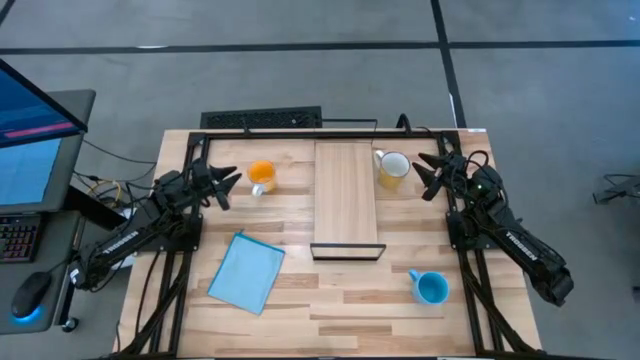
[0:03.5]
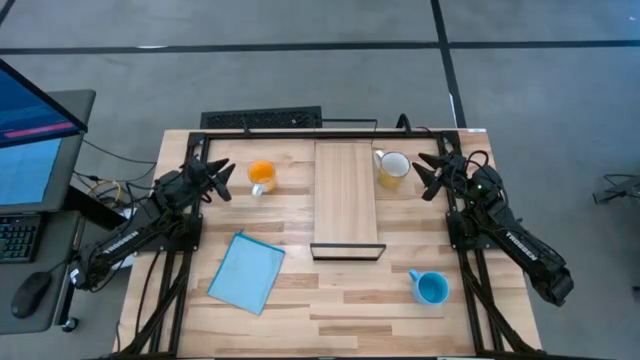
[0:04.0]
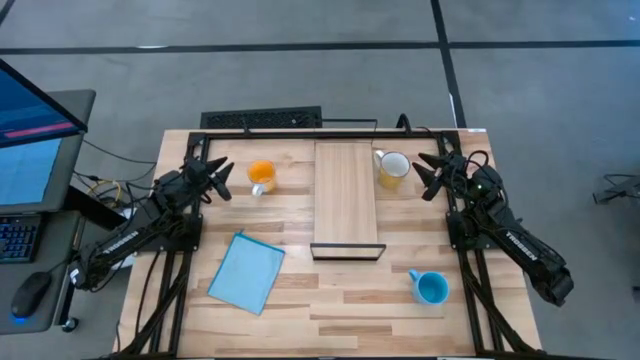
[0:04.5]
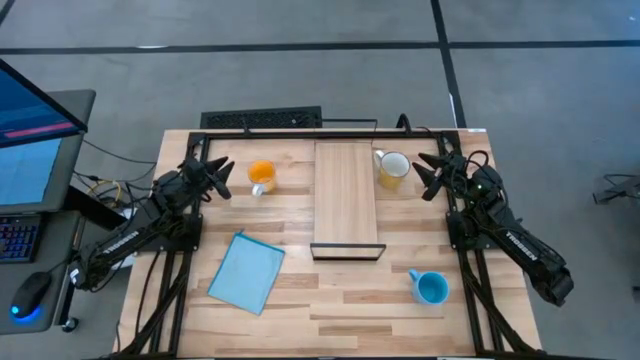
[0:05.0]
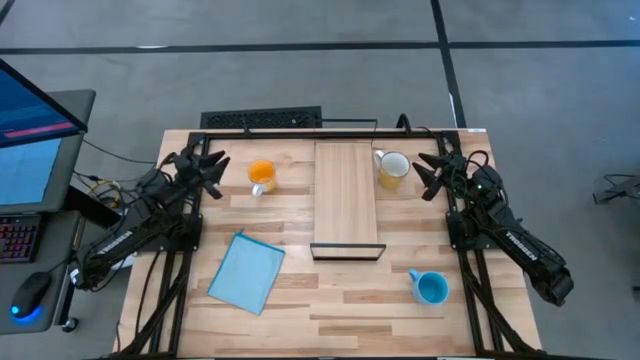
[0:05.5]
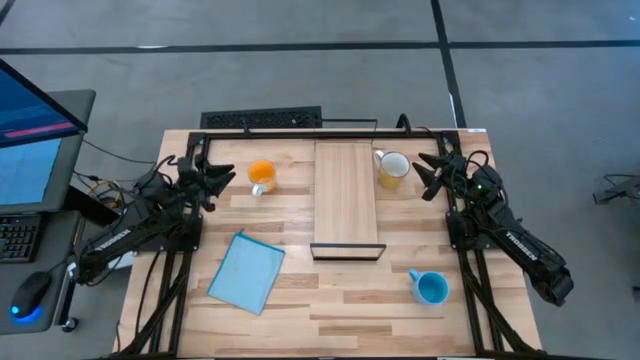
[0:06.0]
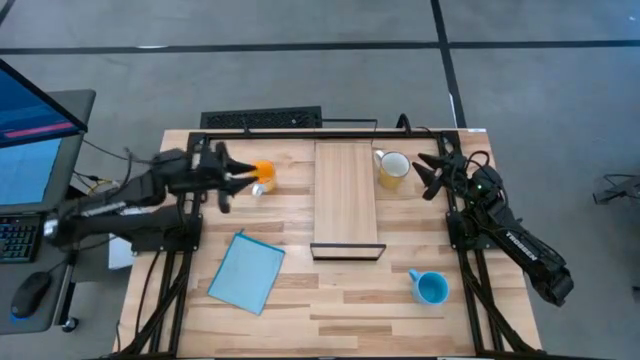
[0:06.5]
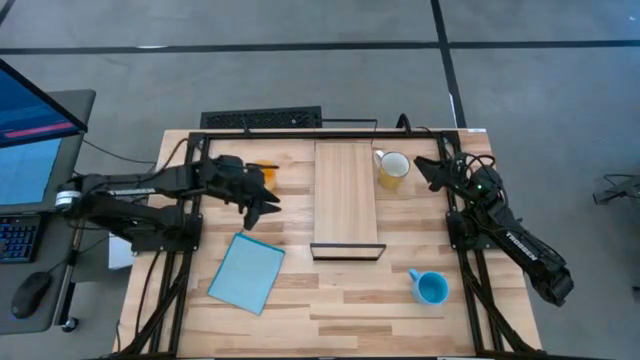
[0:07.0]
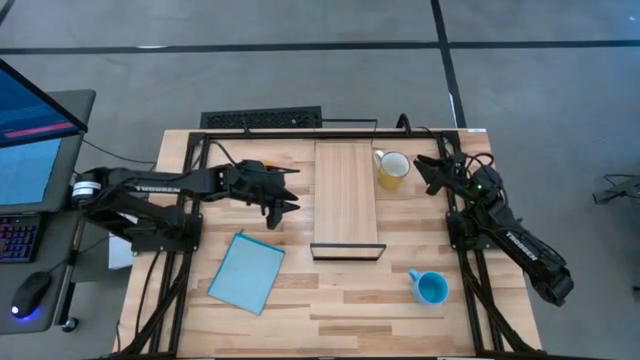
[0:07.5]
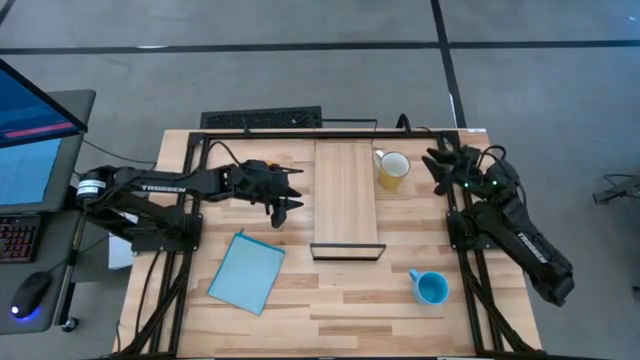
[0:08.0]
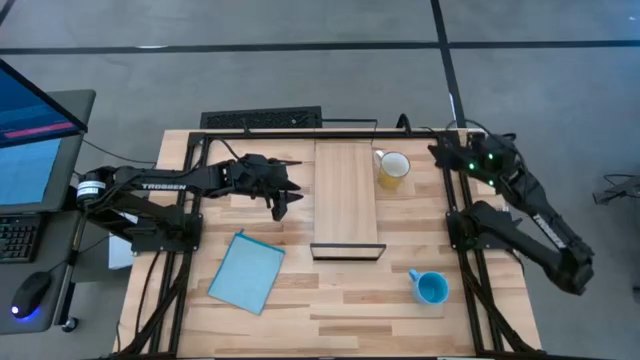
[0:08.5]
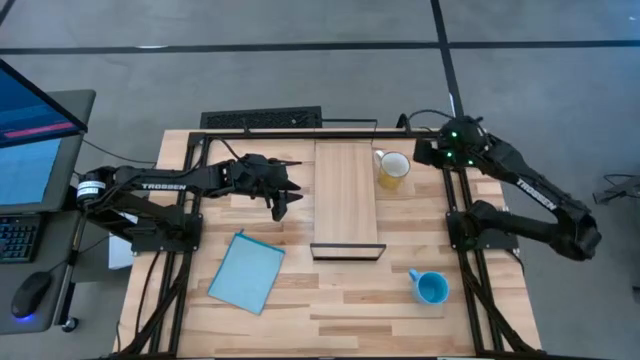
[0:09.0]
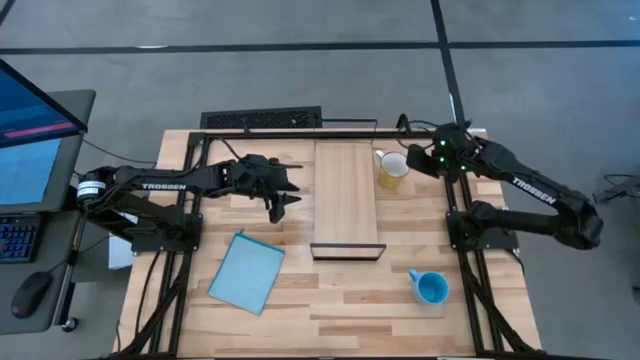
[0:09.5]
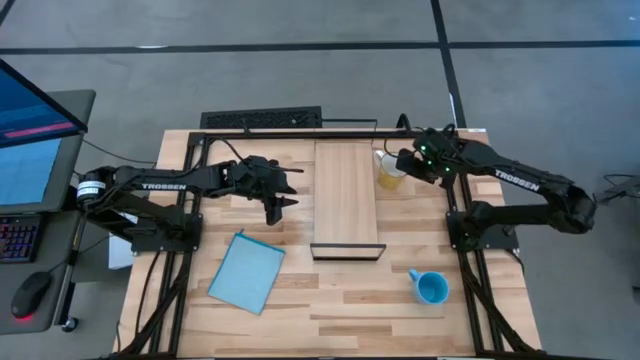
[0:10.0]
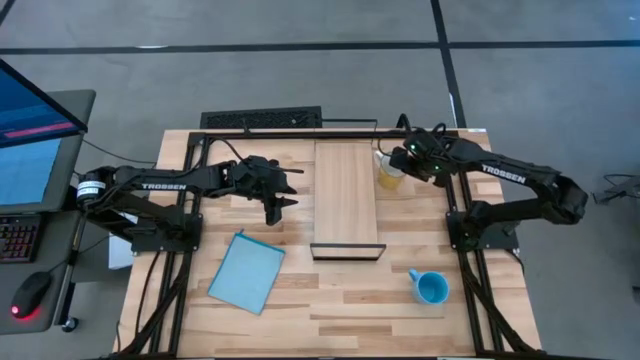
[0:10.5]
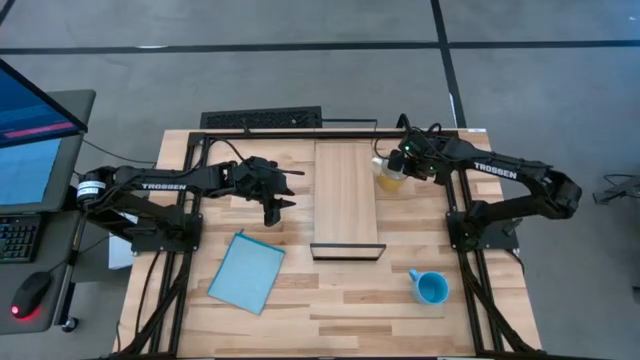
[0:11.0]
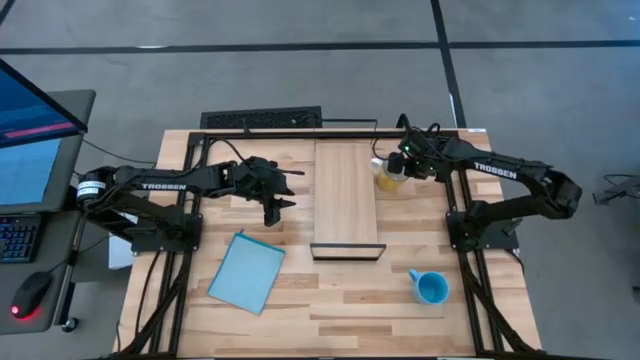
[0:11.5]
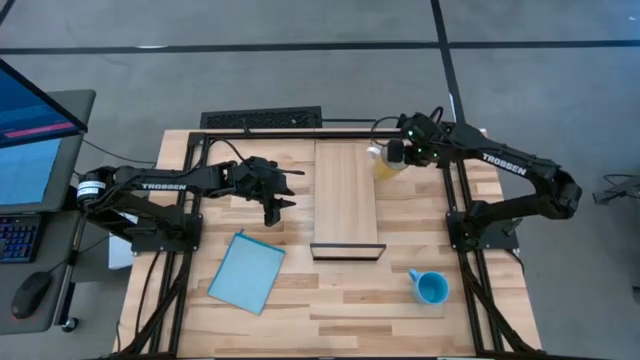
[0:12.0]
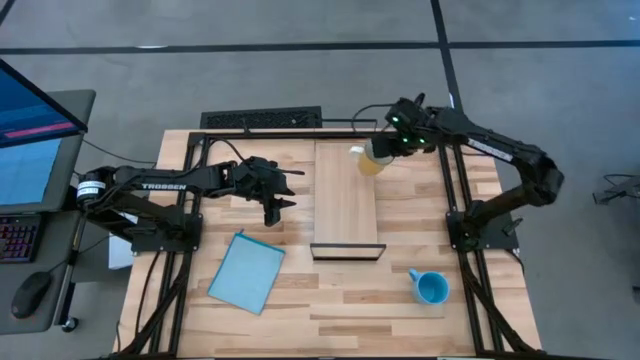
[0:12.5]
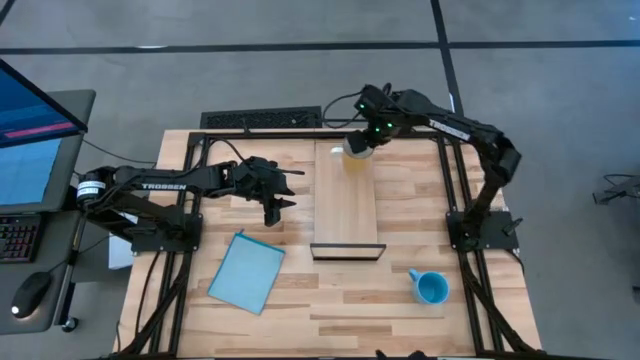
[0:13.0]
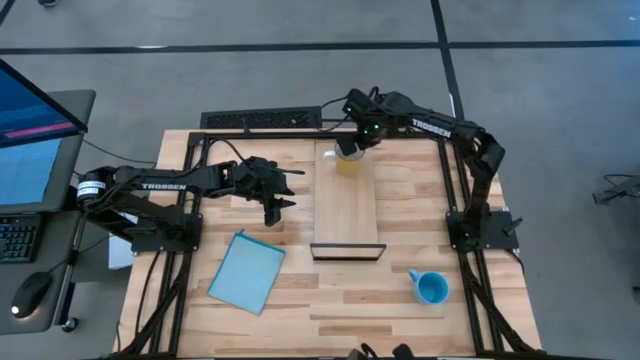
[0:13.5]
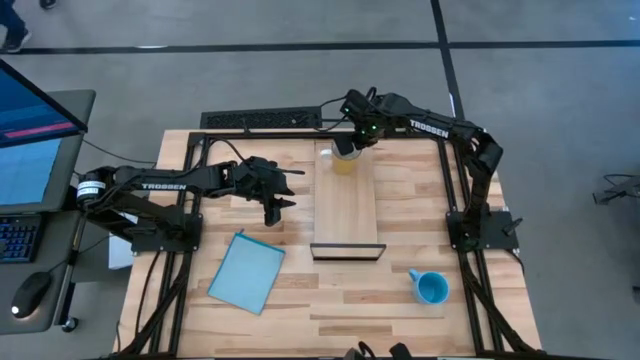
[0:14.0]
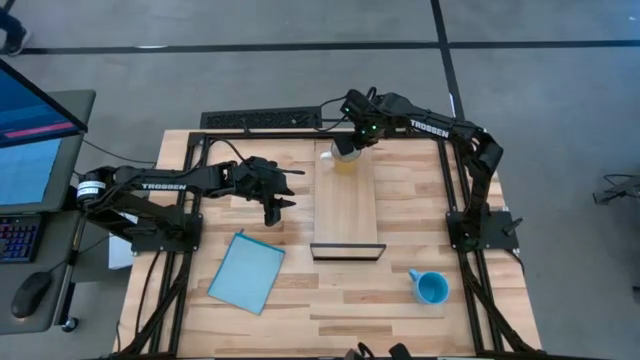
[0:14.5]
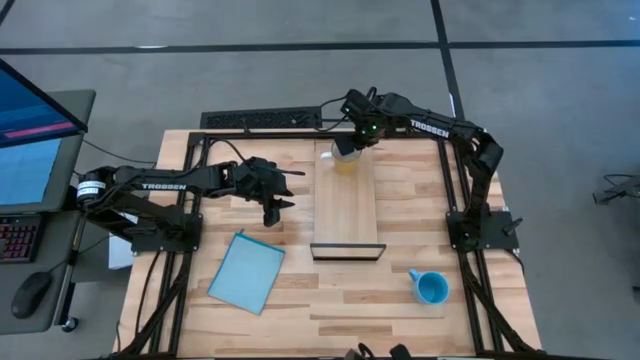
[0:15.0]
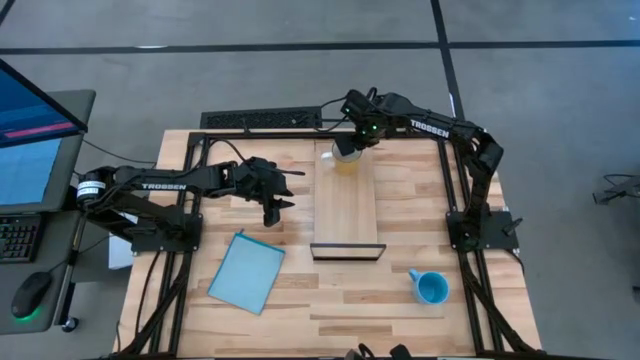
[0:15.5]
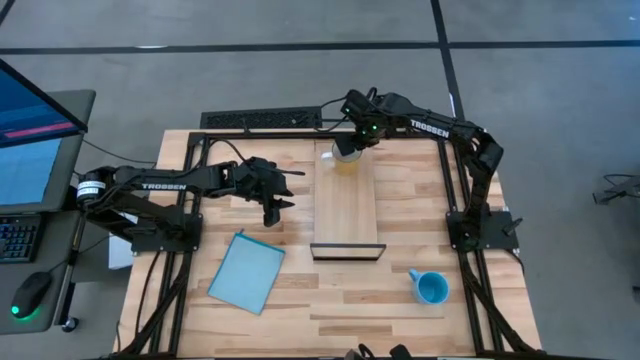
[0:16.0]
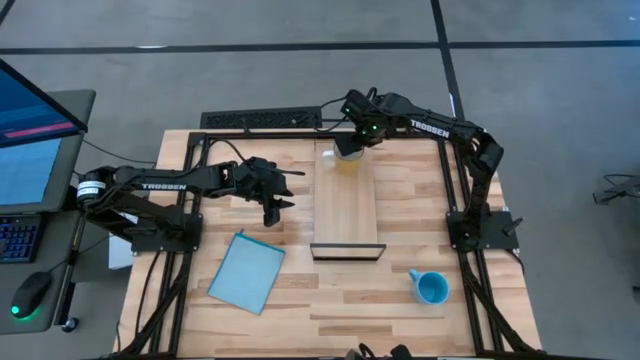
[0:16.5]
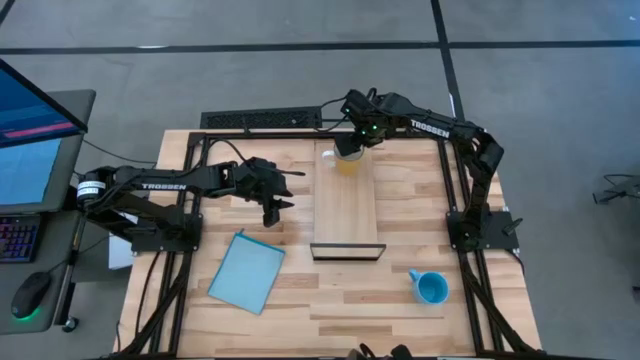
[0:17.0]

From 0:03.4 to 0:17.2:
Task: Stack small to large cups/mugs on shelf
Put the yellow mug on the shelf

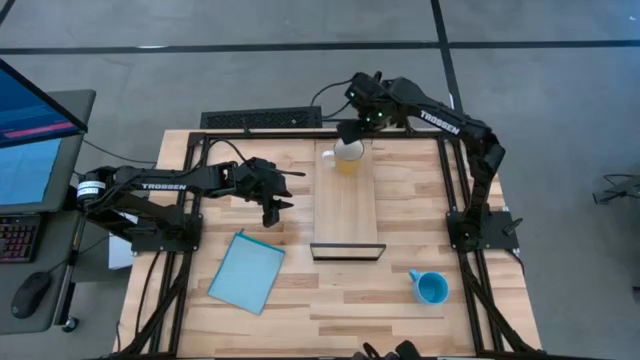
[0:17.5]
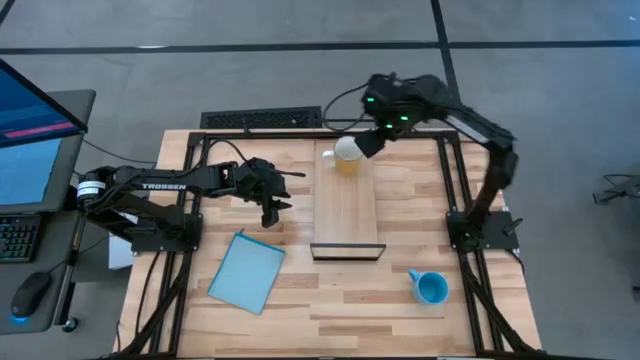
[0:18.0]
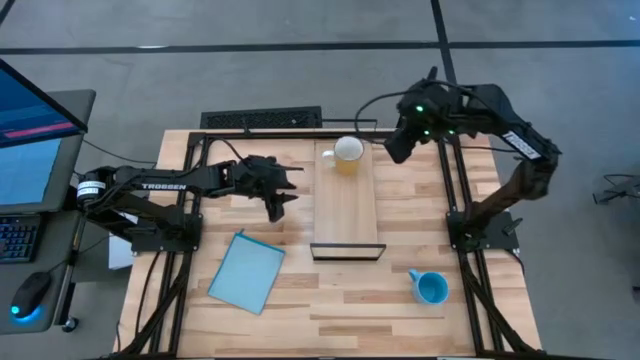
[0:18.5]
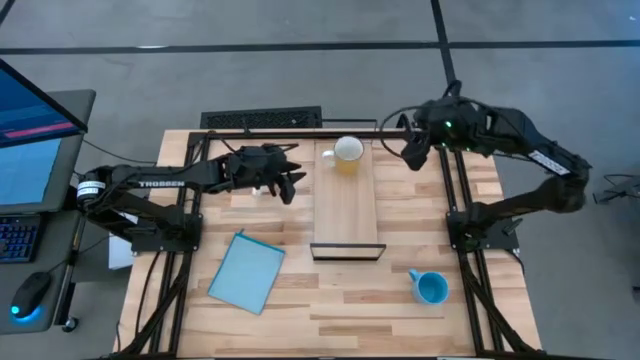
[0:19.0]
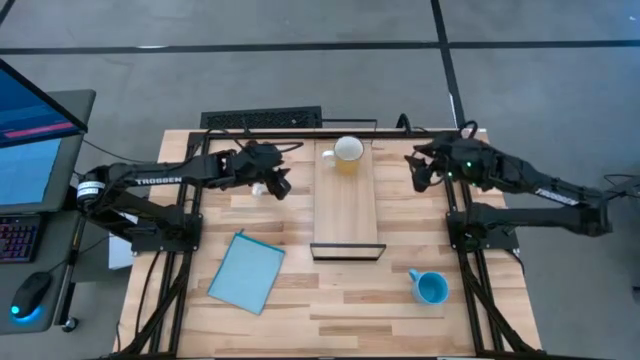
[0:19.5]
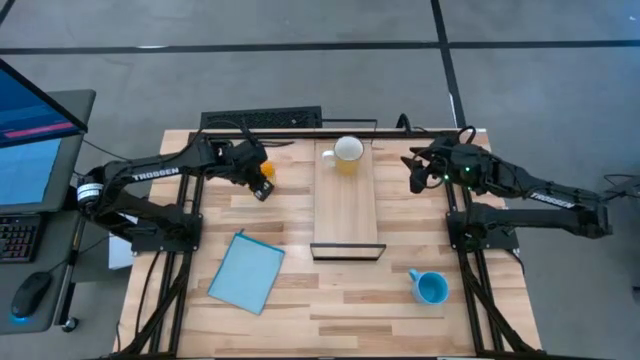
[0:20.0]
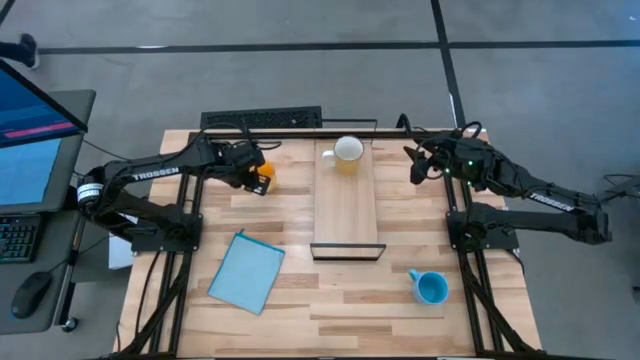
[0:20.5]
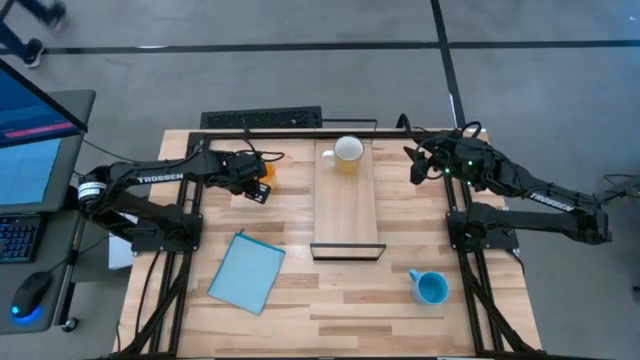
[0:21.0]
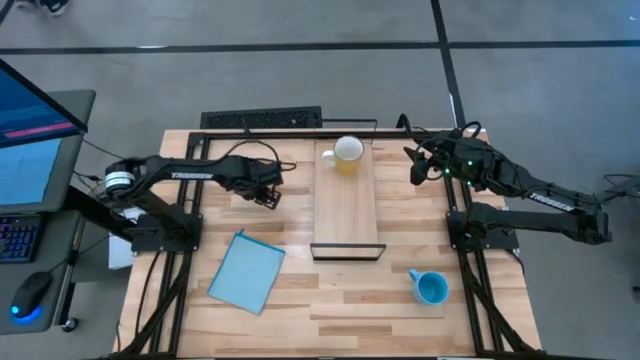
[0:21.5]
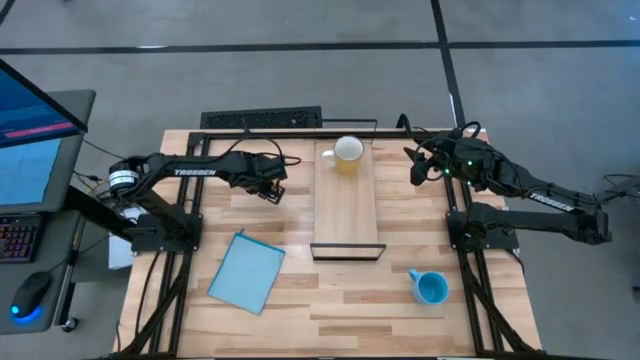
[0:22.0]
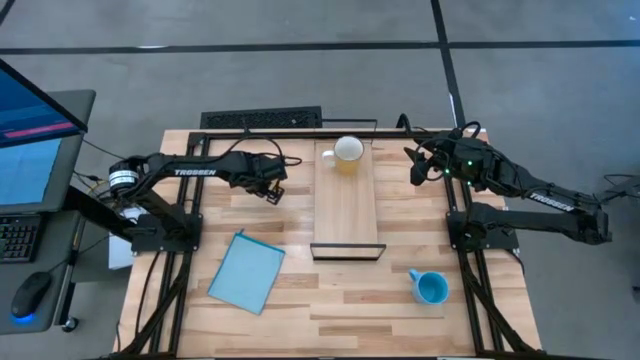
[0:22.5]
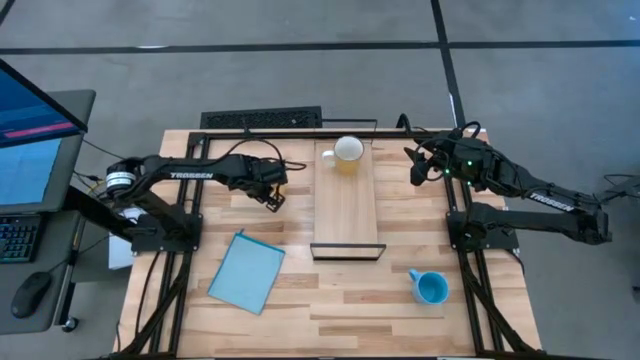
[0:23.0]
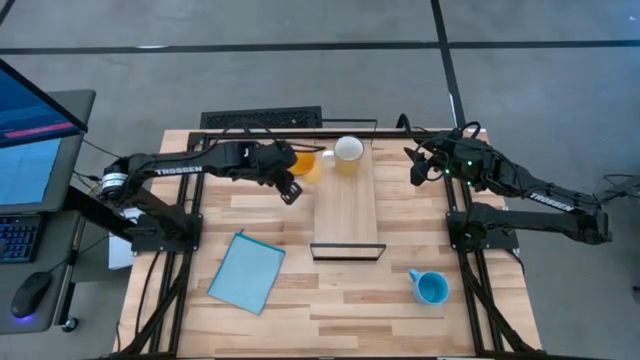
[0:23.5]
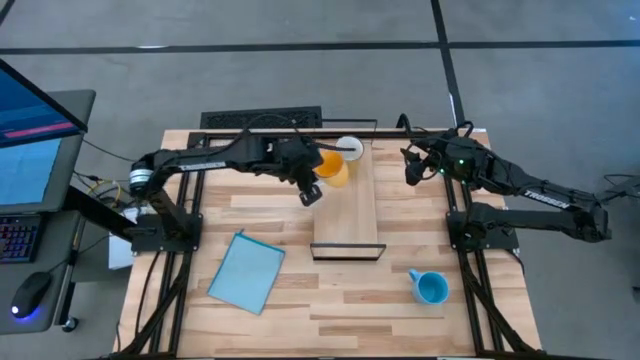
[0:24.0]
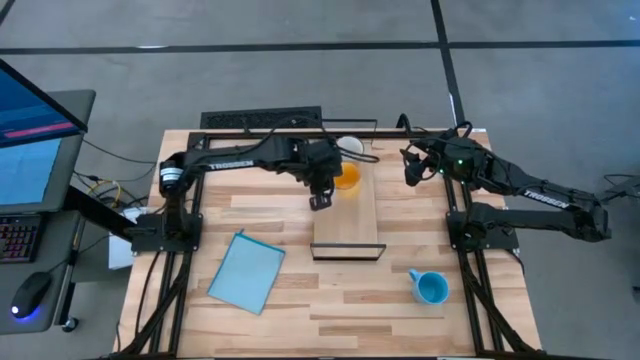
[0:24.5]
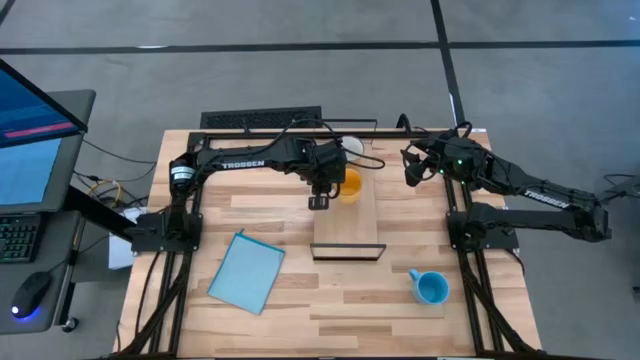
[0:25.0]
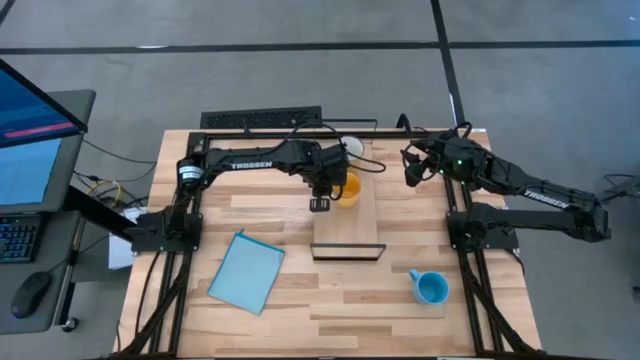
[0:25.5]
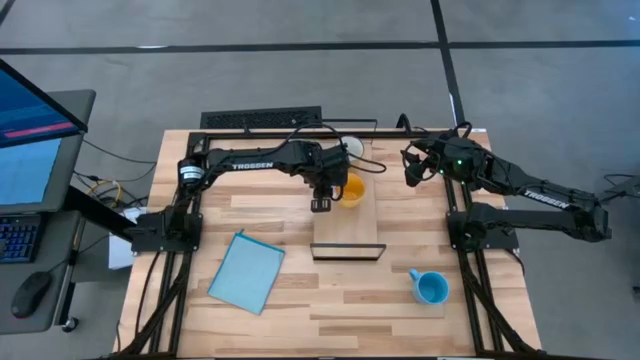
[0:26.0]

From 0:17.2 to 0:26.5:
Put the orange mug on the shelf
